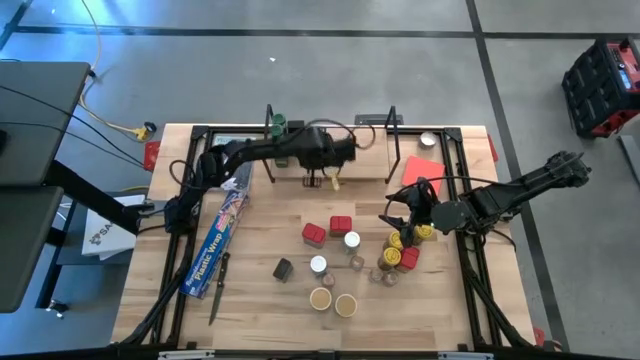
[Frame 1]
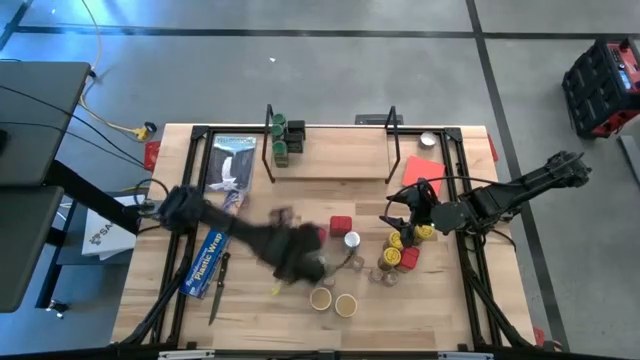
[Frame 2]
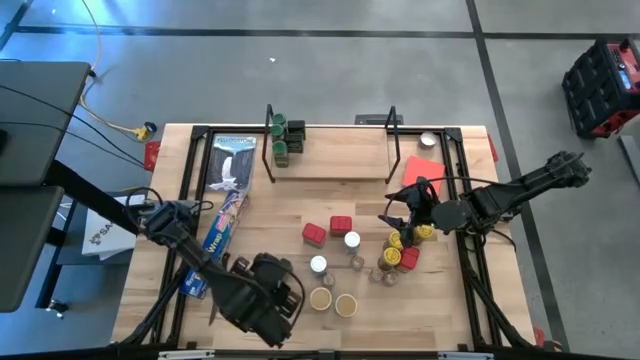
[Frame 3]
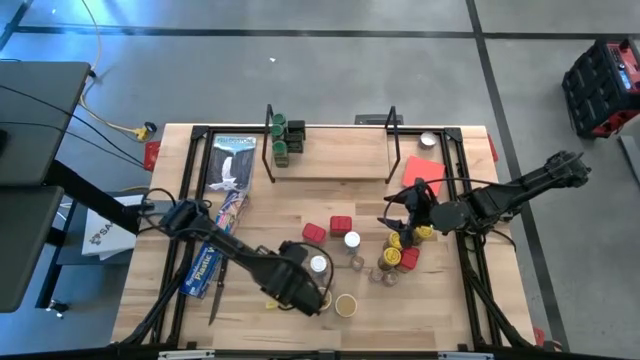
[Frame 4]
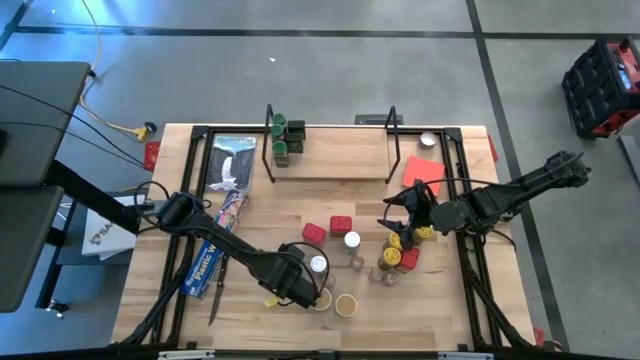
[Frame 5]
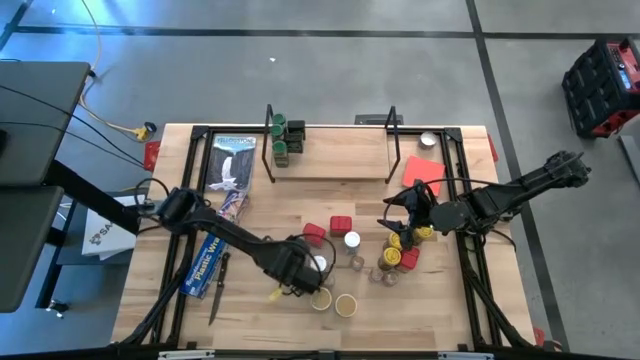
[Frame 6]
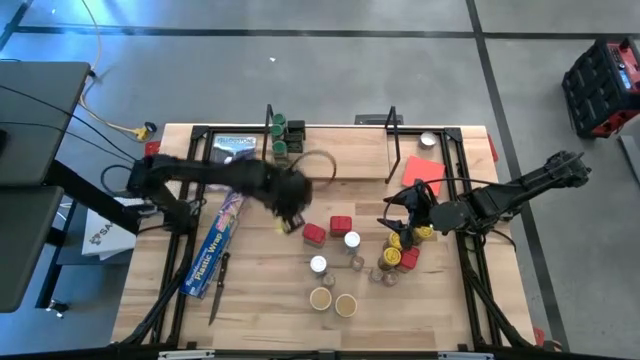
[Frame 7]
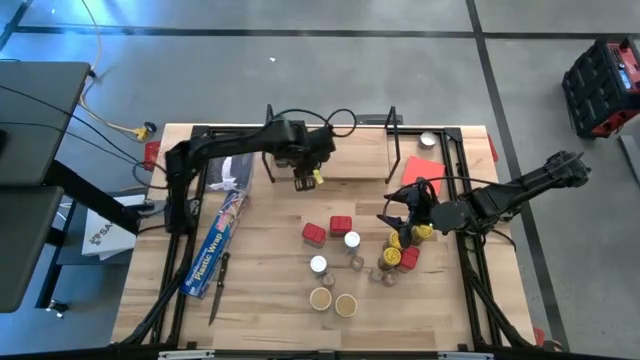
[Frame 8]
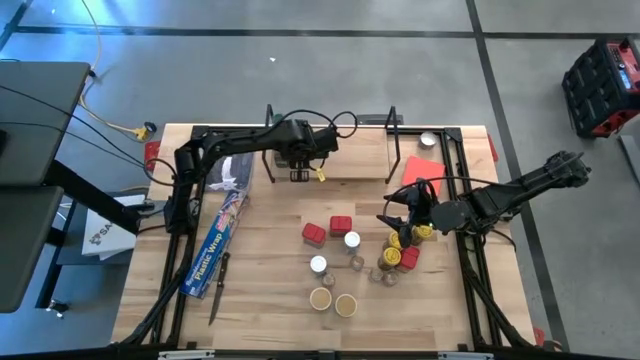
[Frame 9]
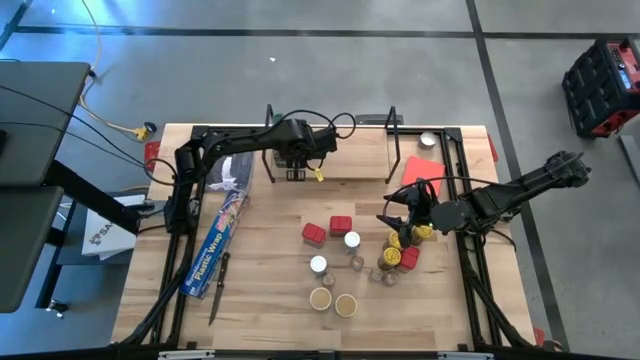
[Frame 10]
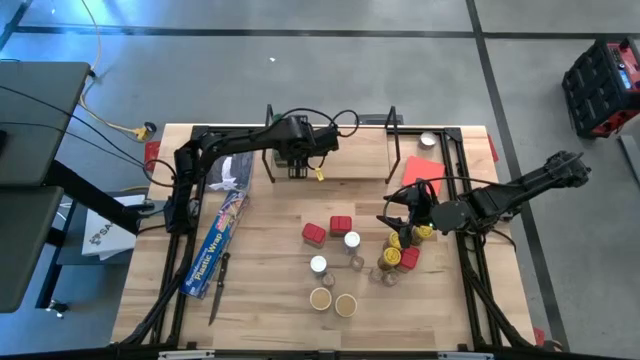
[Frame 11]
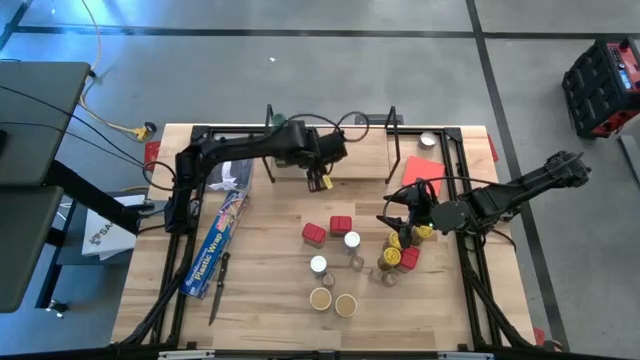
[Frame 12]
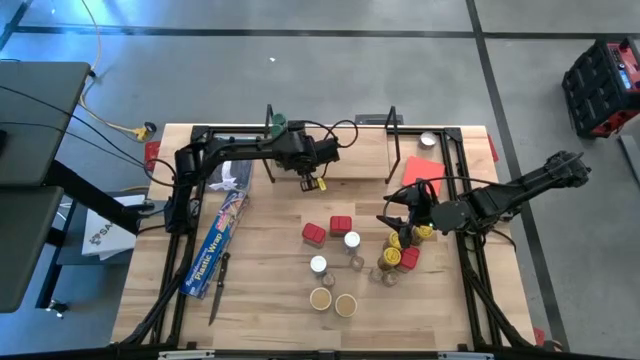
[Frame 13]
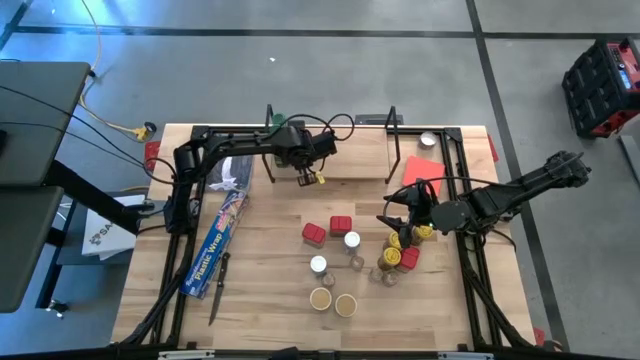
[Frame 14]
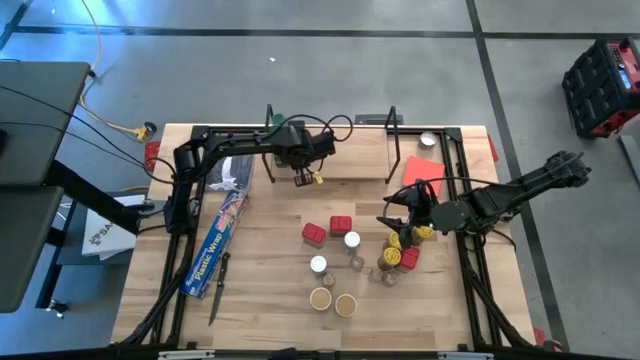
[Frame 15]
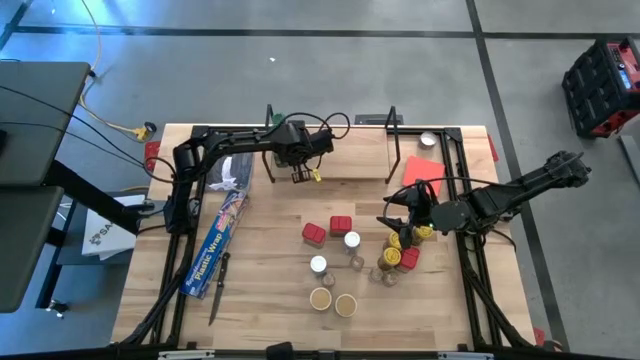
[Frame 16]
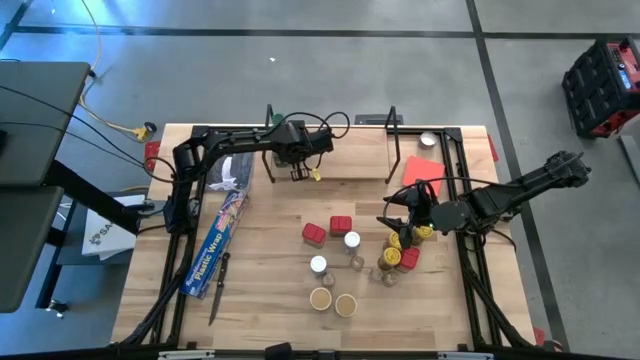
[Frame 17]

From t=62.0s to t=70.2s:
Task: Shelf spices
Put the black seasoning can on the shelf and align it with the other black seasoning cans

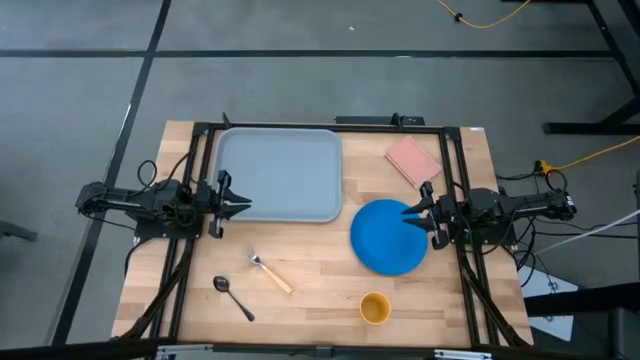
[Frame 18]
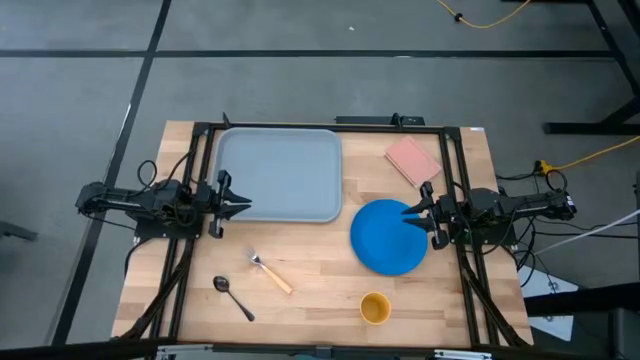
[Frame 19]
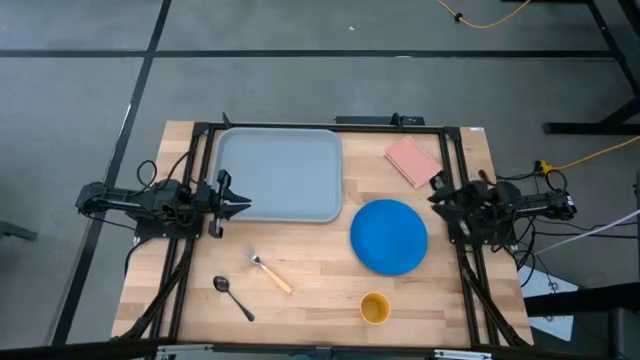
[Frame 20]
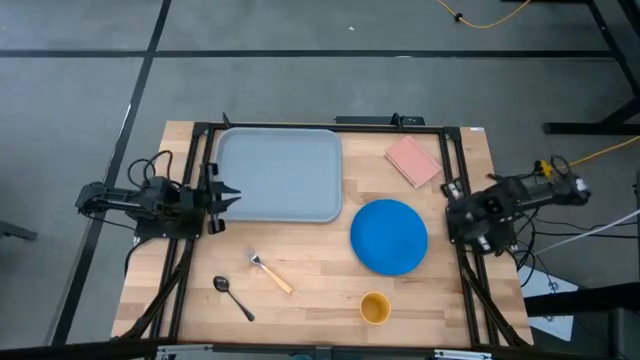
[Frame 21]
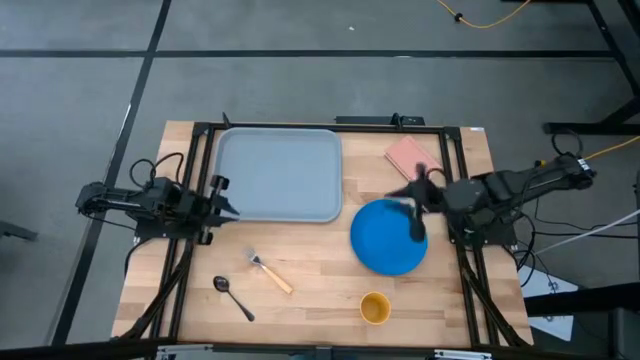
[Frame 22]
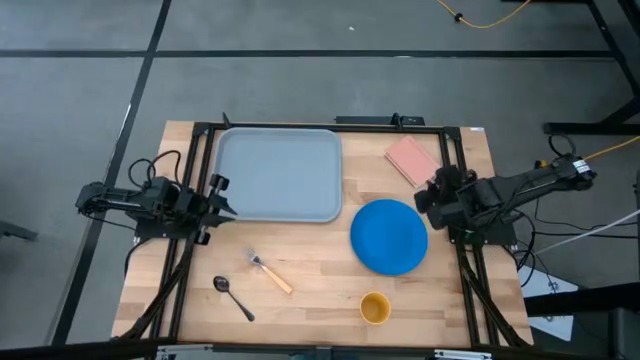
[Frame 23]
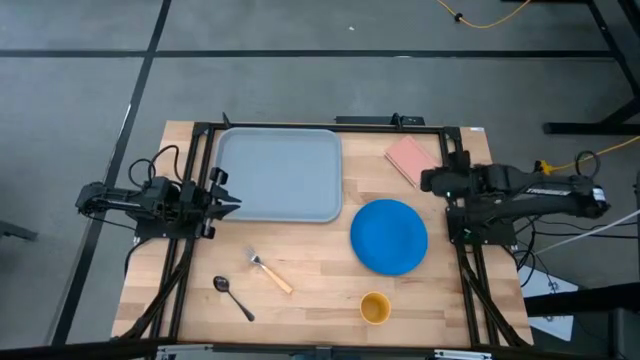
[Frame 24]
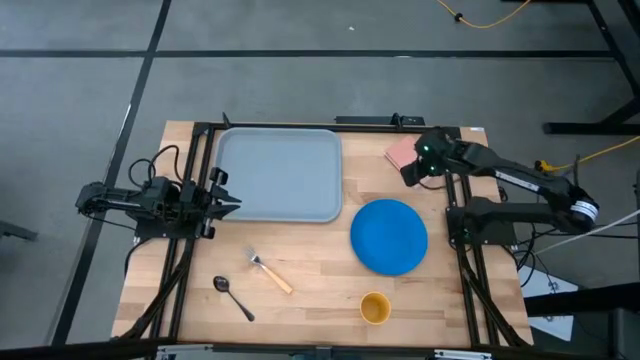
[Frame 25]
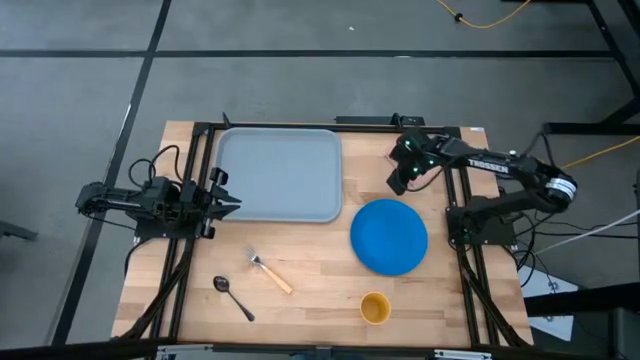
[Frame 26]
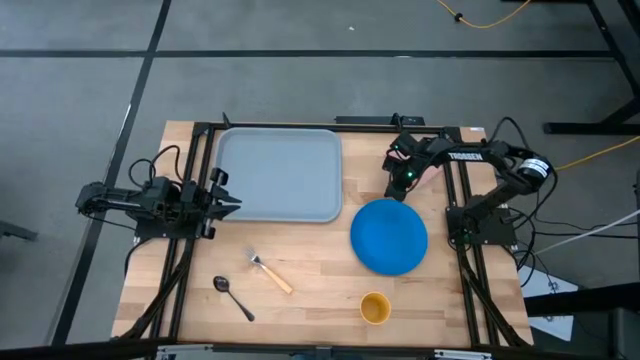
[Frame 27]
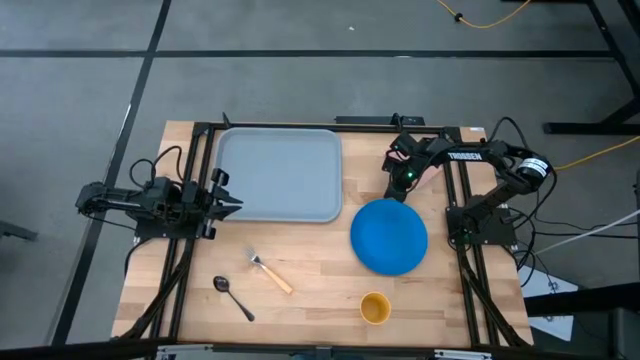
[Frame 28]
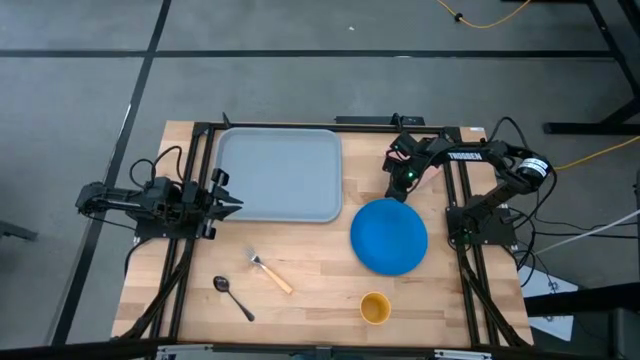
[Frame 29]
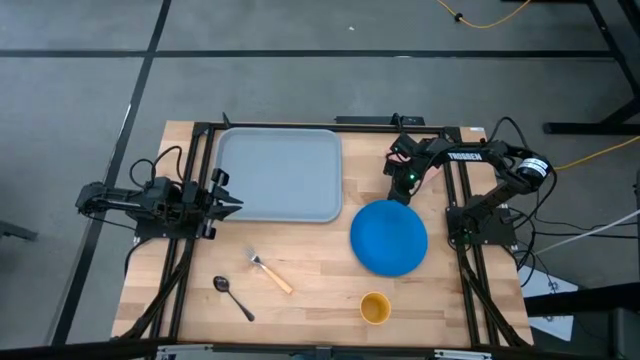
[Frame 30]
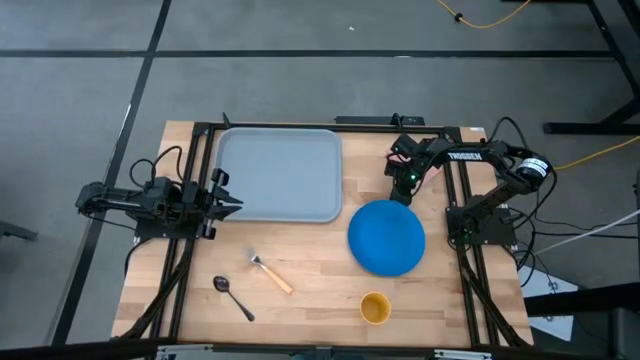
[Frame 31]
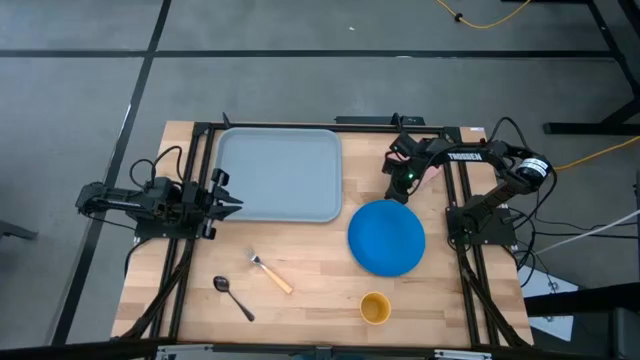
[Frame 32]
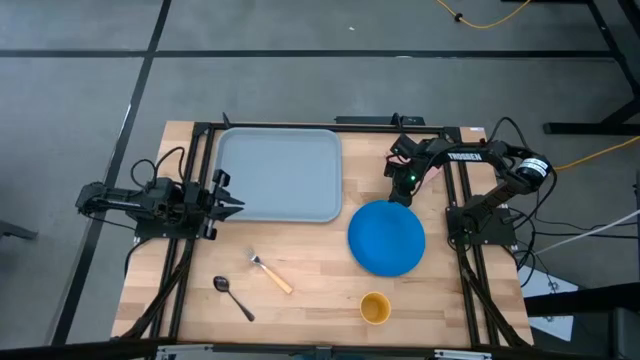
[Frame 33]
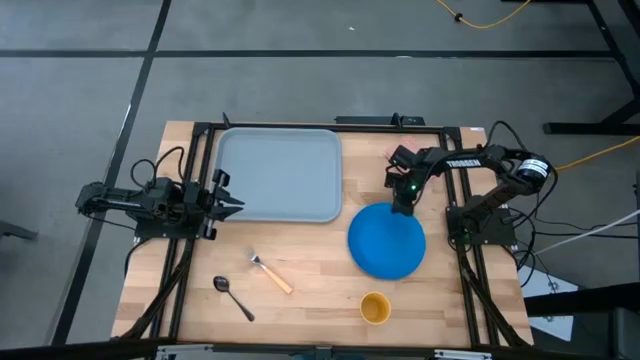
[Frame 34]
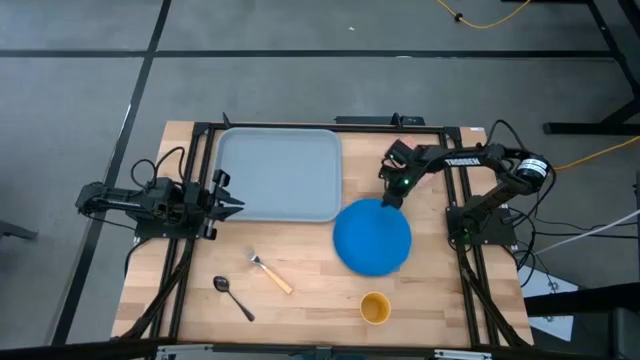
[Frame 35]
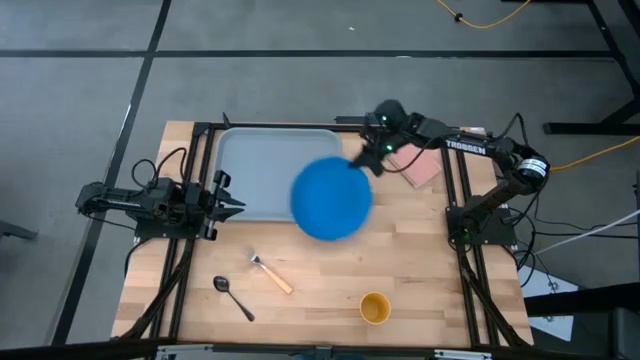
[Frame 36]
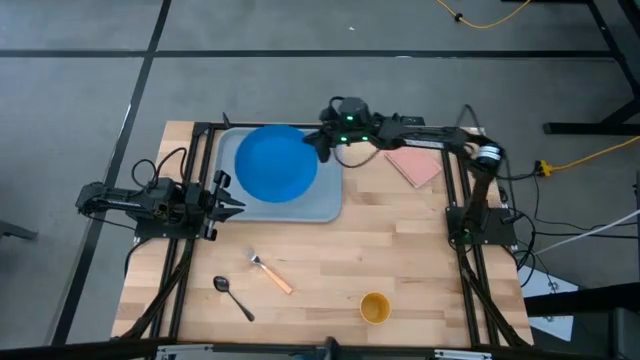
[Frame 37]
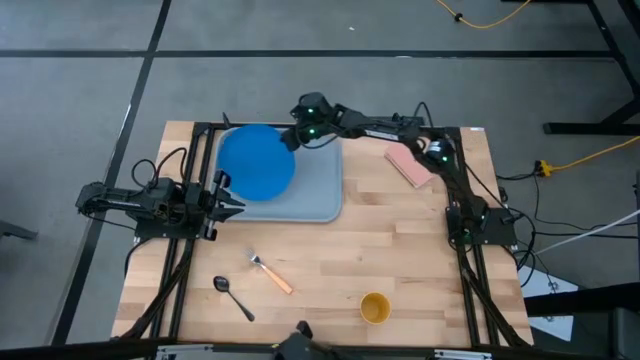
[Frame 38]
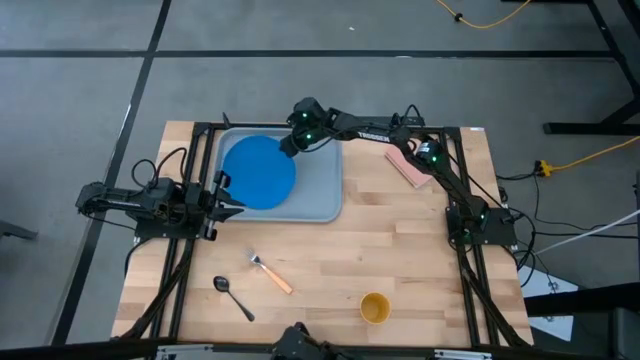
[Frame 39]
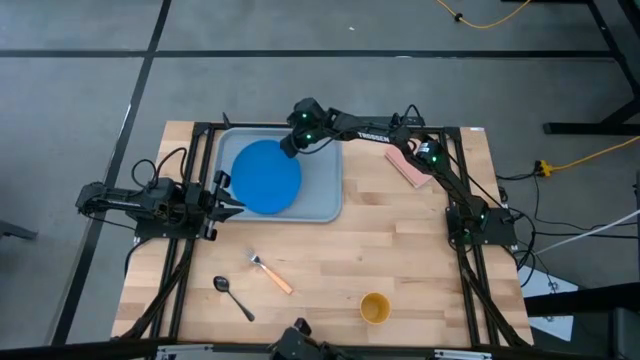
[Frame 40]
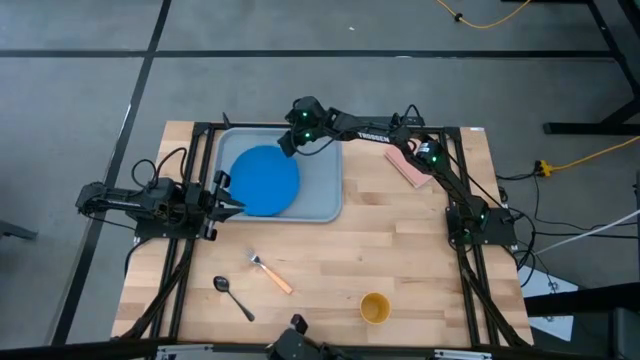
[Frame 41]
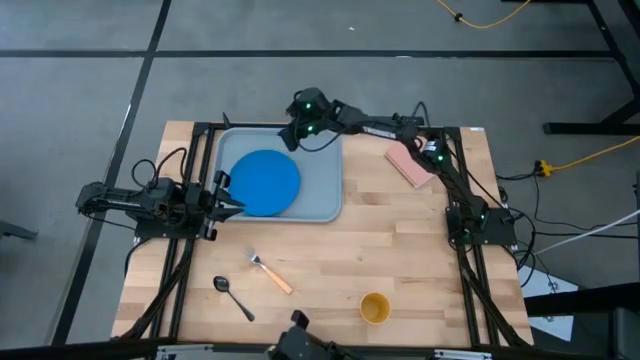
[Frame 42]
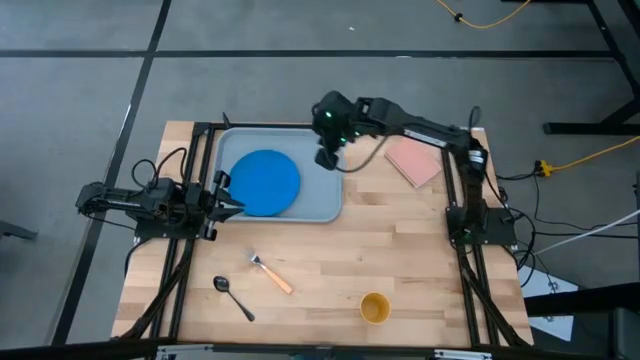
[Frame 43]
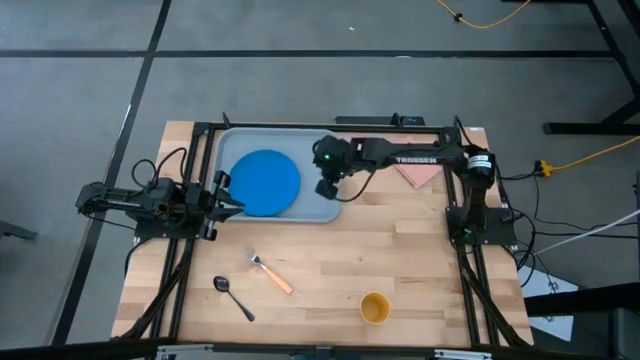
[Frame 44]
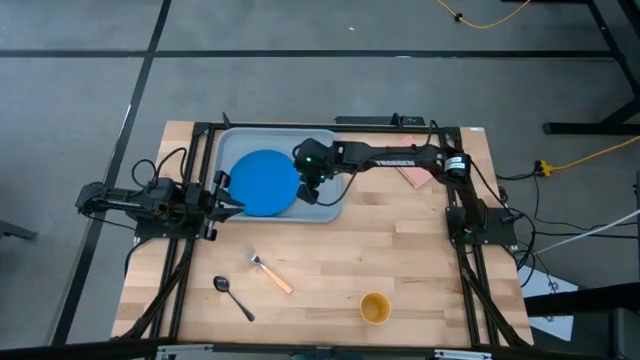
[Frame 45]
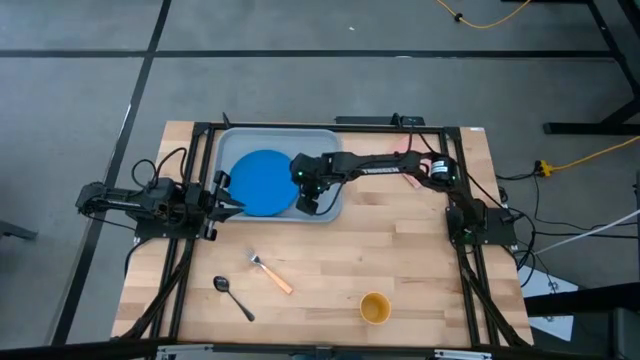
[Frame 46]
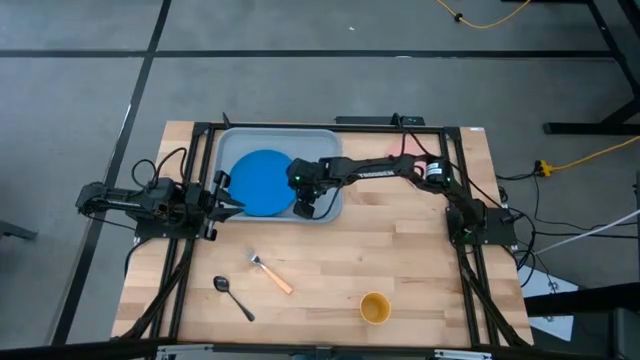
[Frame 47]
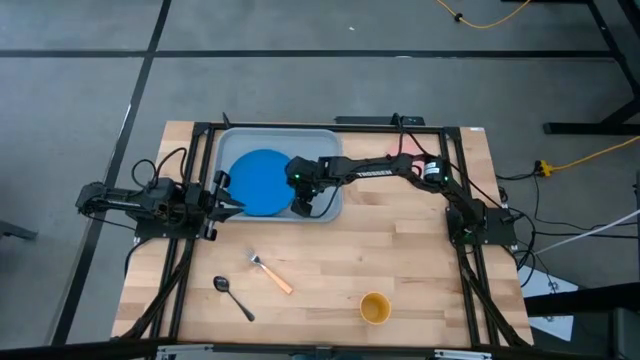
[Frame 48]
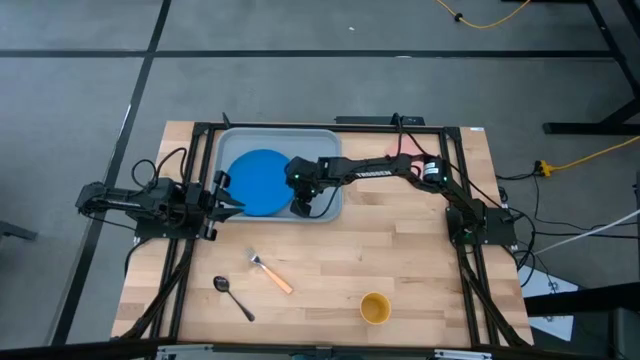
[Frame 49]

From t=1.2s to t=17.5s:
Task: Pick and place plate/cup/fork/spoon on tray
Put the blue plate on the gray serving tray
